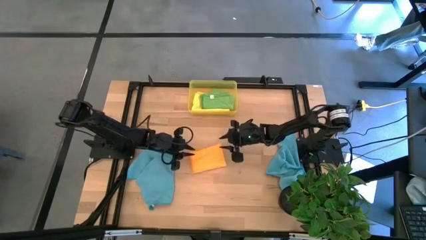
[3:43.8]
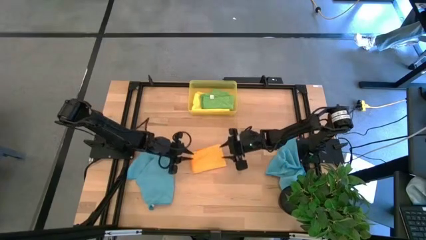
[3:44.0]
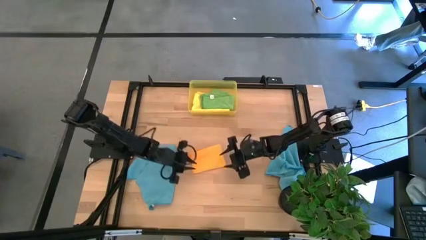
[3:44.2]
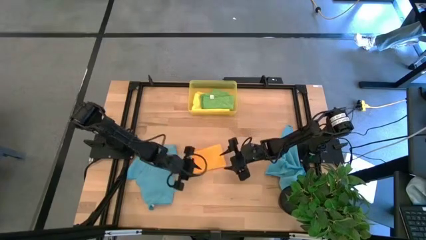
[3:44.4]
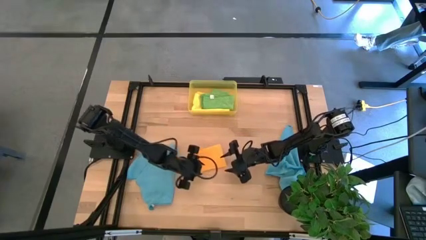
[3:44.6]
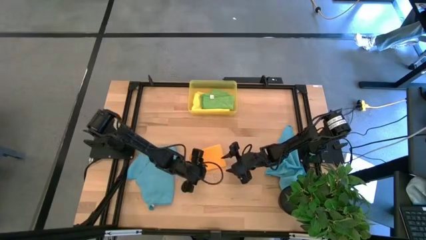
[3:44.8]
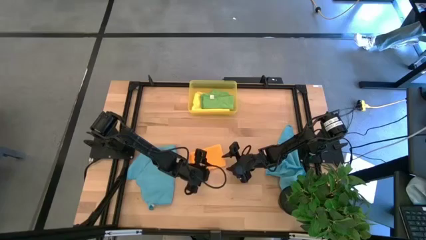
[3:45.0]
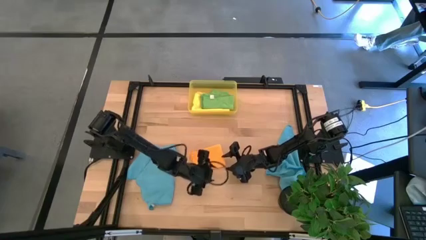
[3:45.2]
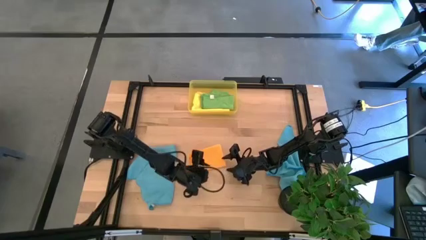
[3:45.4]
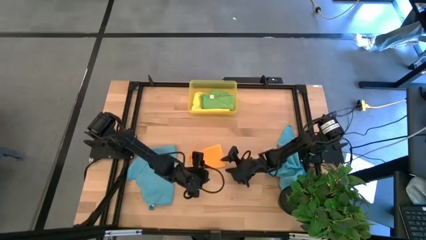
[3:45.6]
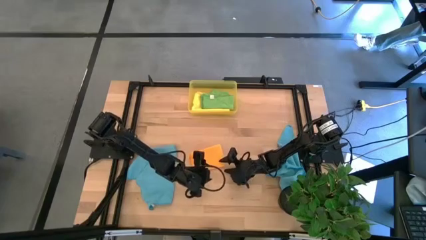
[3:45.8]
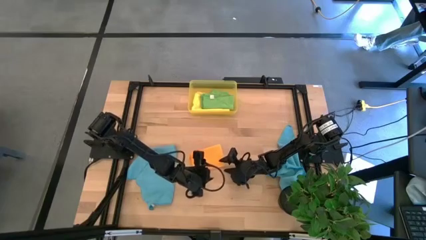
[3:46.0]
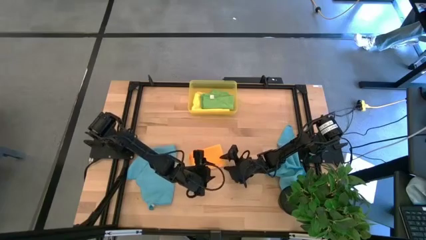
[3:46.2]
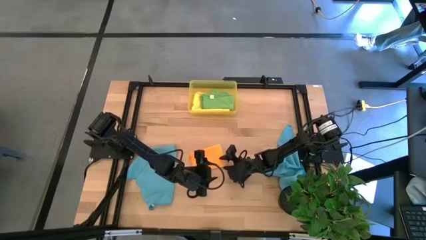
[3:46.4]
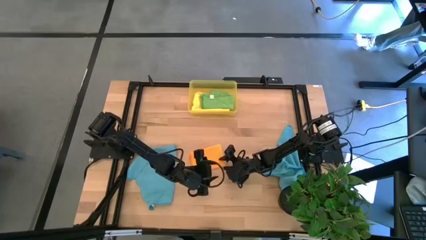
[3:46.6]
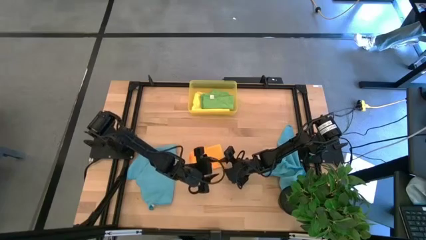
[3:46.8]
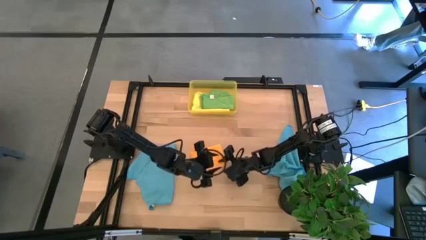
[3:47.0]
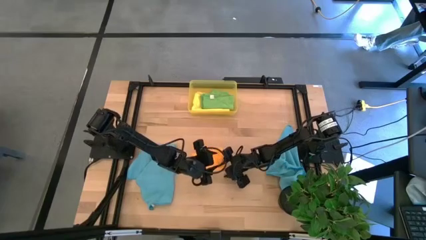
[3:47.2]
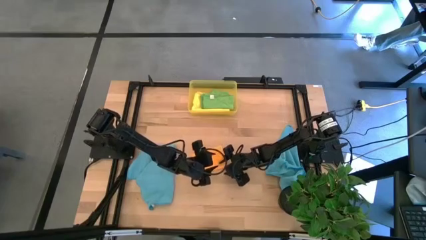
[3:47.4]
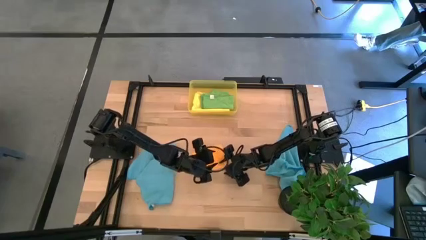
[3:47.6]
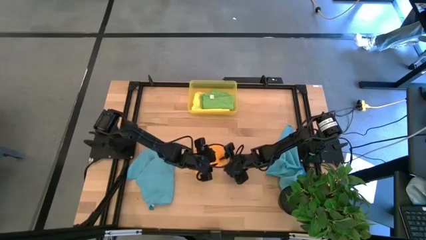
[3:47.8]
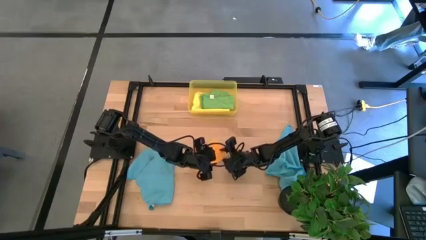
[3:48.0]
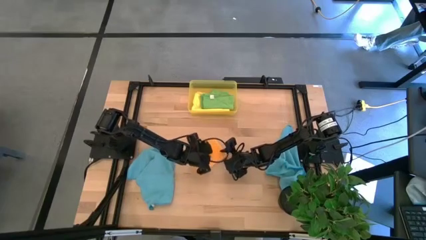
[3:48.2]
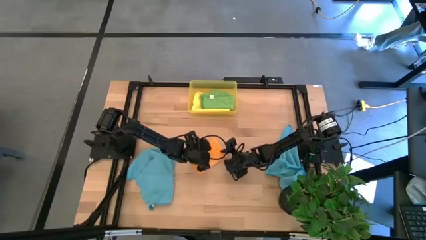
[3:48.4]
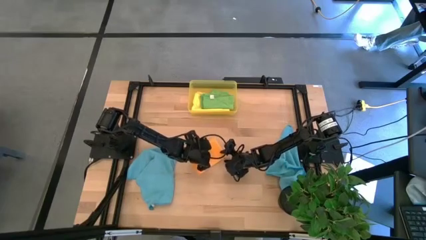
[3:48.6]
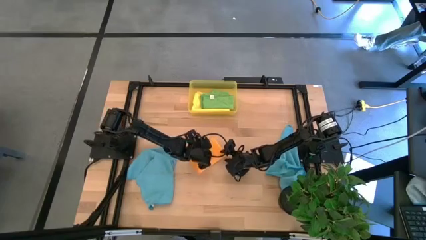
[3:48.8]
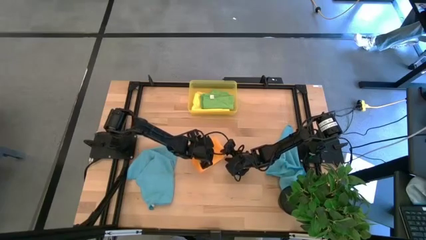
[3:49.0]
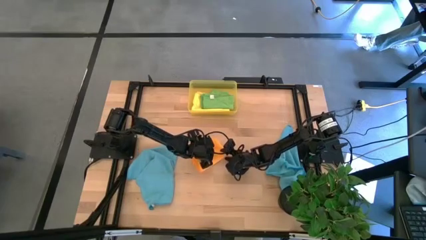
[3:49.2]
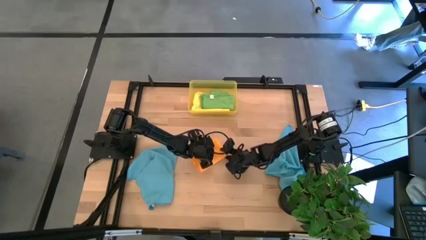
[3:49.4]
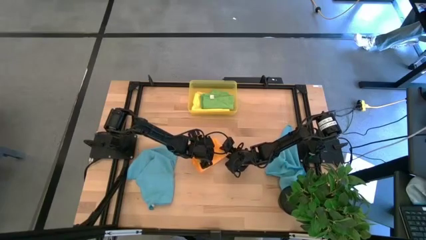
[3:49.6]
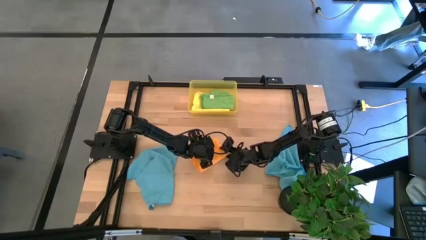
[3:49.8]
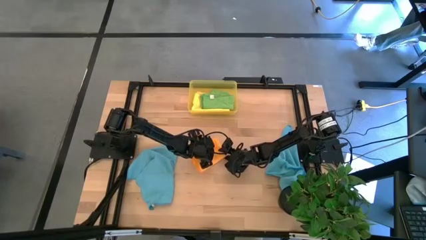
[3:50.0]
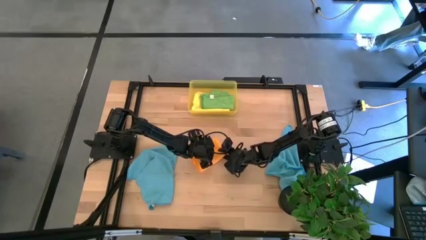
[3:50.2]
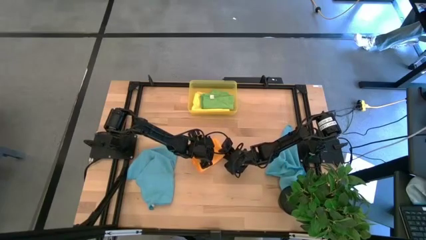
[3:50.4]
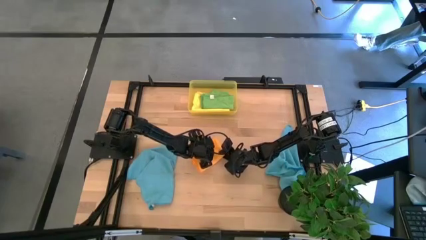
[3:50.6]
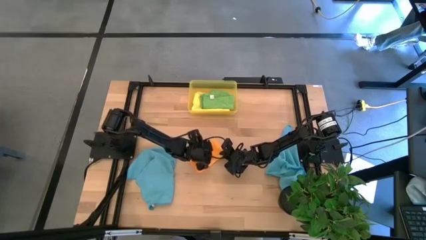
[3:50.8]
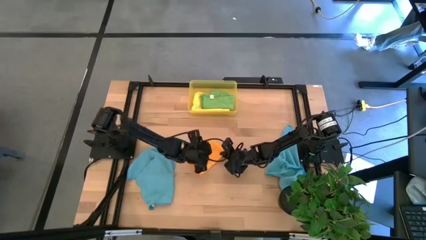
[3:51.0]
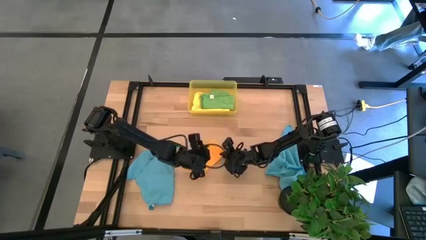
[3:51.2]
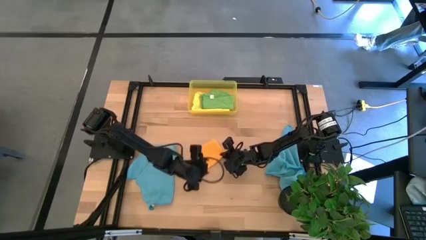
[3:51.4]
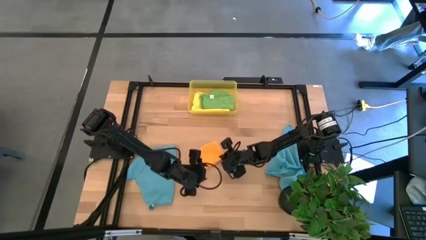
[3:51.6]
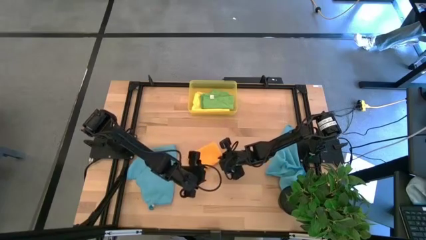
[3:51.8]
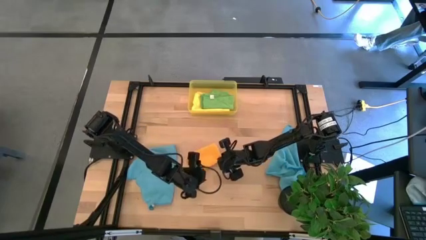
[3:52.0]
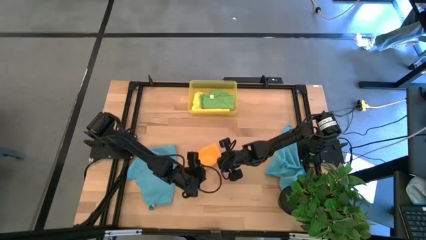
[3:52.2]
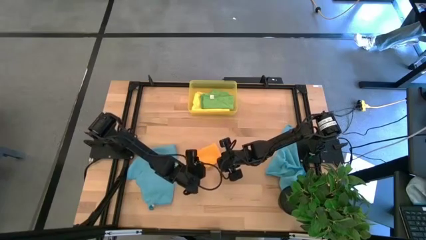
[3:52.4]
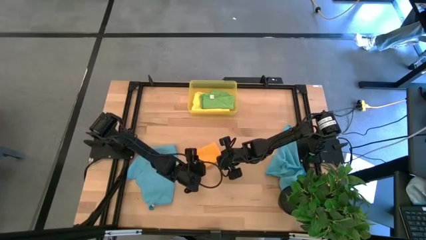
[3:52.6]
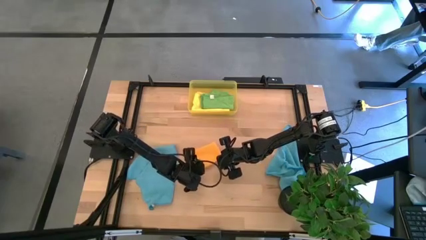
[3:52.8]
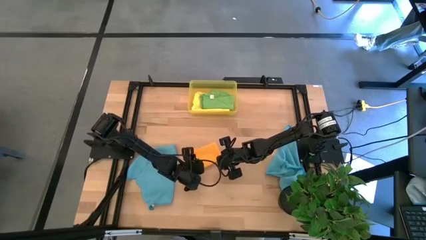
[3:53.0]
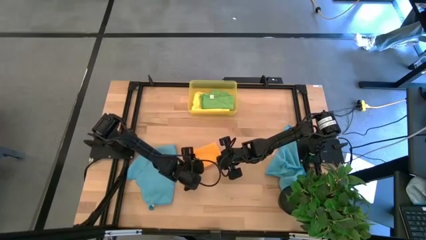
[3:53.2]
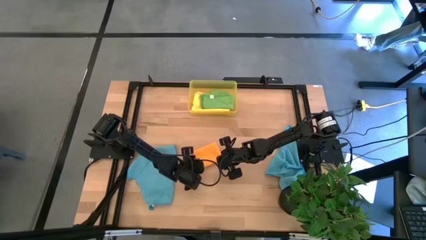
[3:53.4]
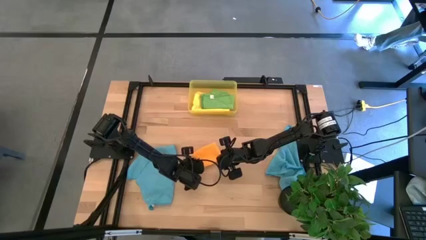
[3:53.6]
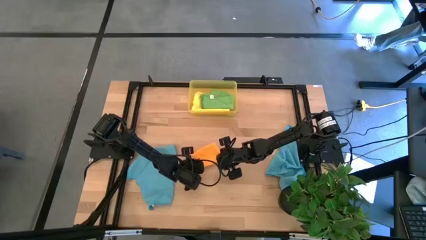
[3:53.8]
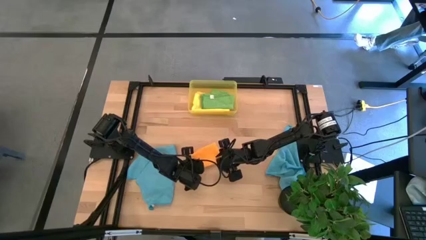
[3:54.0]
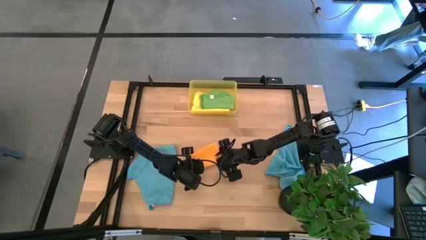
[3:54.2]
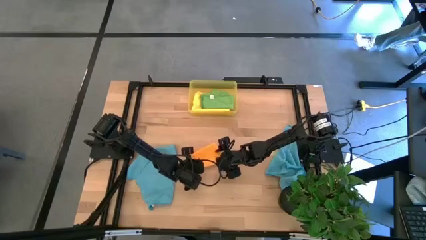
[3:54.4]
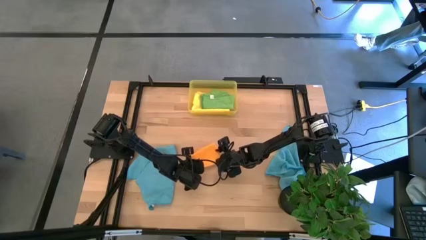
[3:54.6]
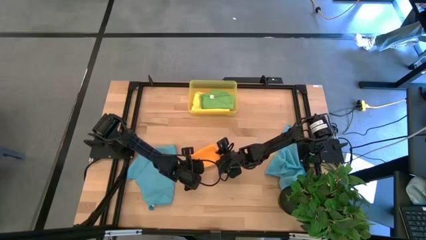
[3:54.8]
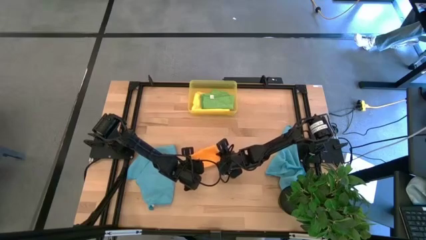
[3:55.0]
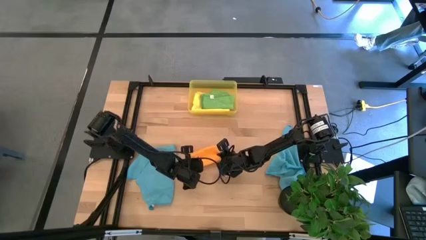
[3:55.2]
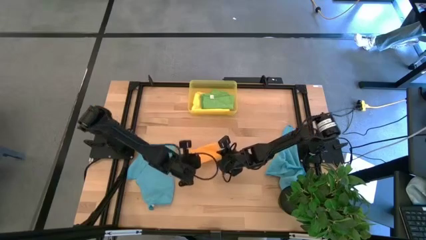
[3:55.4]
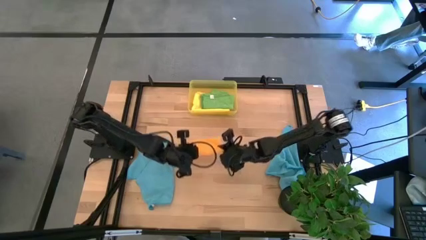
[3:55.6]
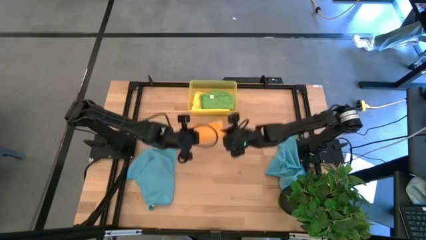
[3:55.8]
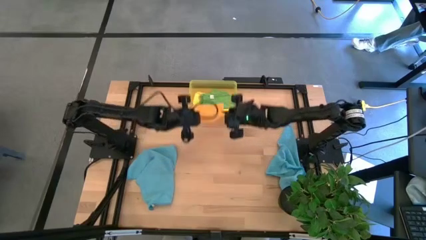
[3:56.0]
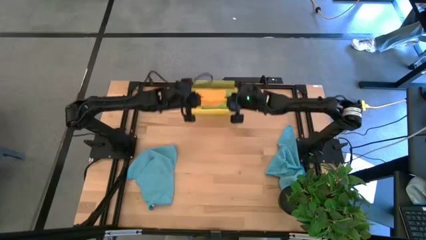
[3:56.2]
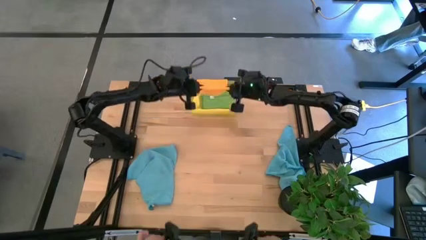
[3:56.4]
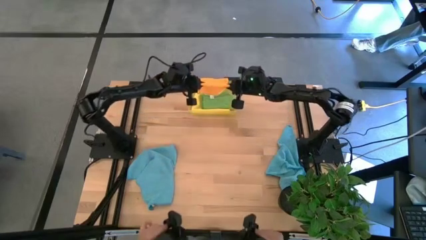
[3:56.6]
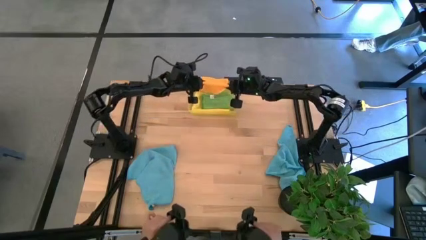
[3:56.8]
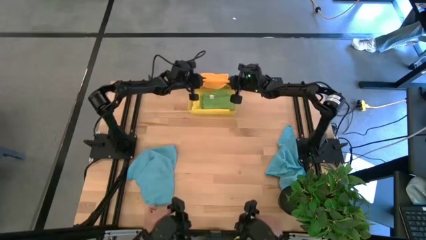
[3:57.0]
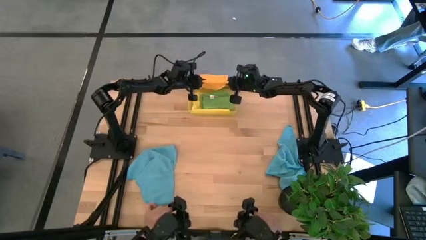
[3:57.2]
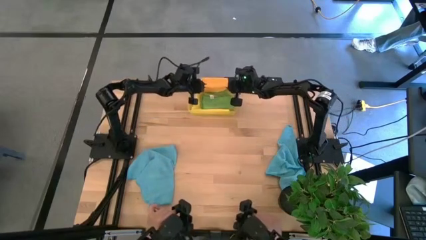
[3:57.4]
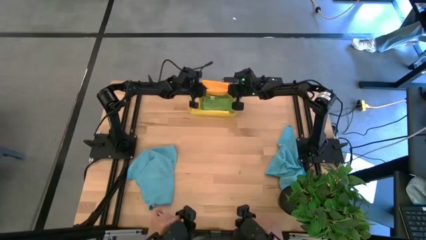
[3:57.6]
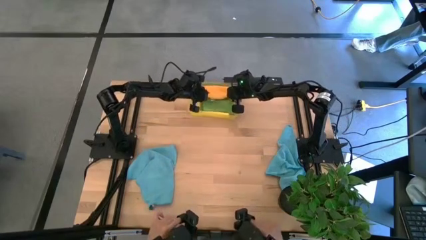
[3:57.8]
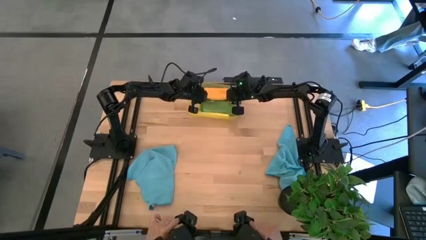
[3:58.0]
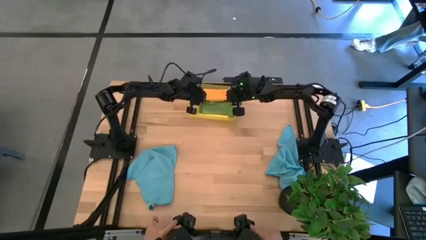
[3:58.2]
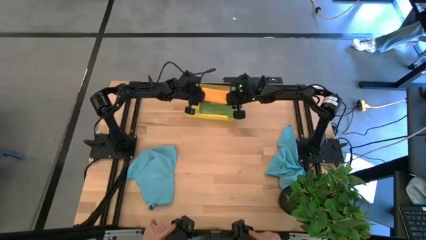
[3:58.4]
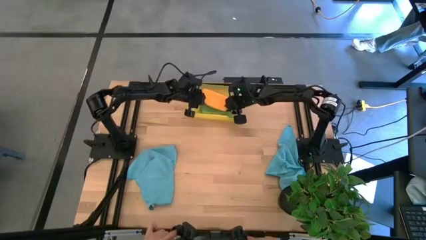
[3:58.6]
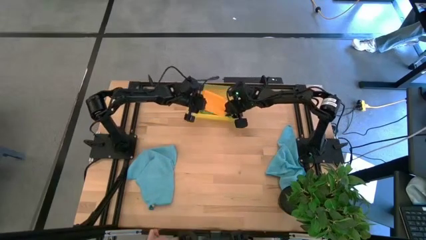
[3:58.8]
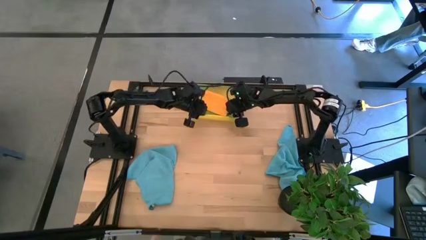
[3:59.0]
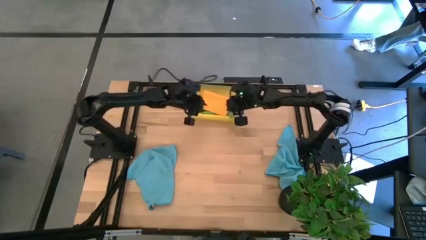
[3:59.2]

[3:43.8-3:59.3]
Task: Fold microfiber towels
Put the orange towel into the yellow bin
